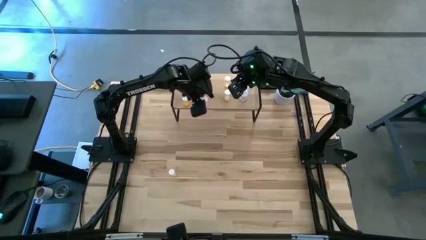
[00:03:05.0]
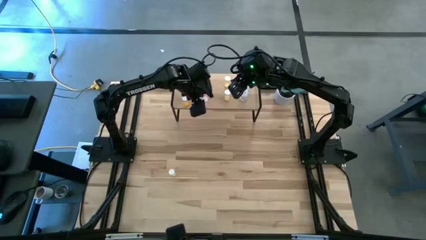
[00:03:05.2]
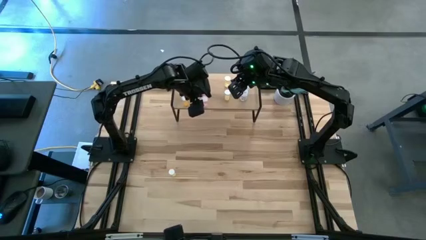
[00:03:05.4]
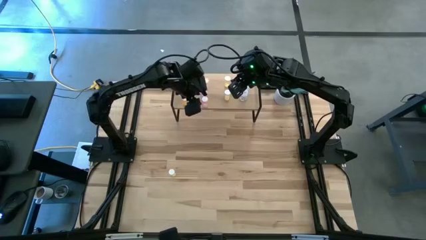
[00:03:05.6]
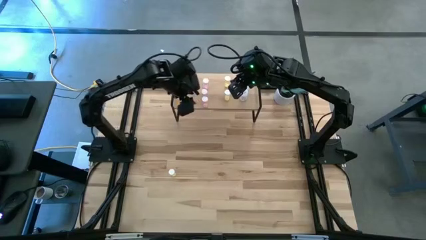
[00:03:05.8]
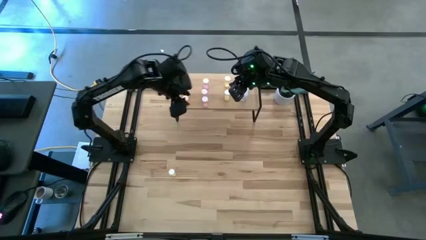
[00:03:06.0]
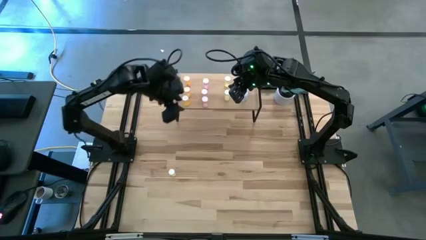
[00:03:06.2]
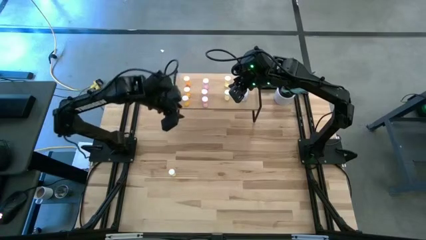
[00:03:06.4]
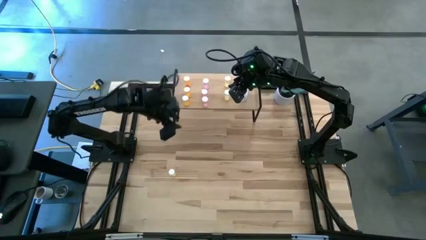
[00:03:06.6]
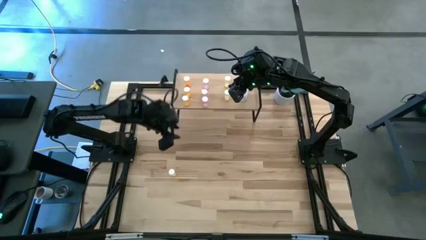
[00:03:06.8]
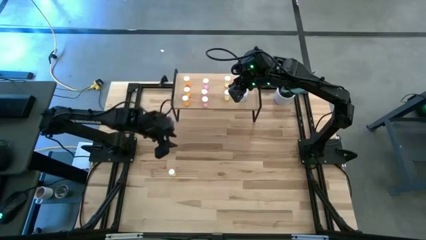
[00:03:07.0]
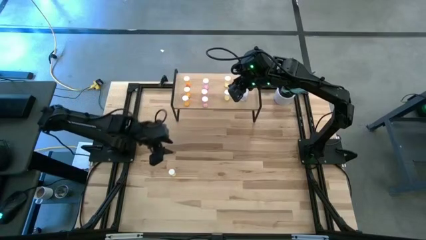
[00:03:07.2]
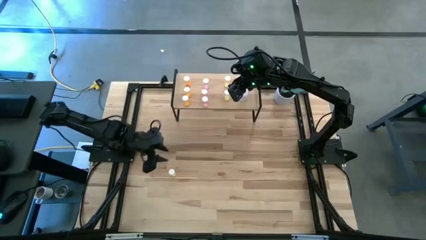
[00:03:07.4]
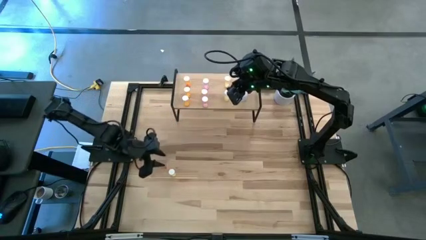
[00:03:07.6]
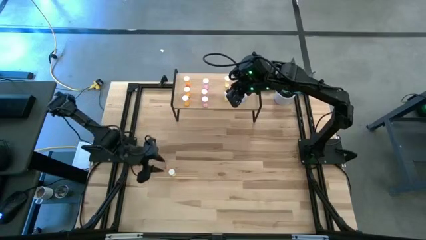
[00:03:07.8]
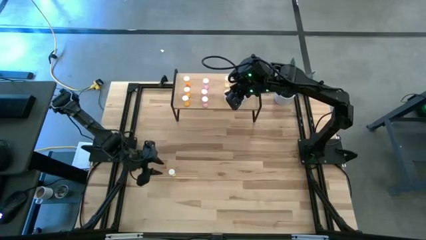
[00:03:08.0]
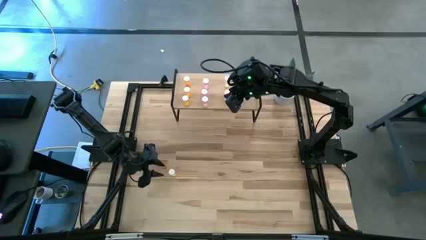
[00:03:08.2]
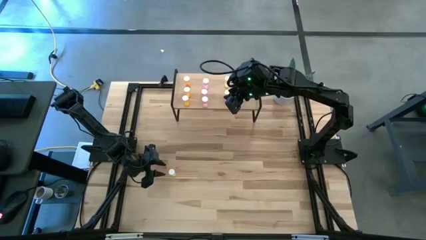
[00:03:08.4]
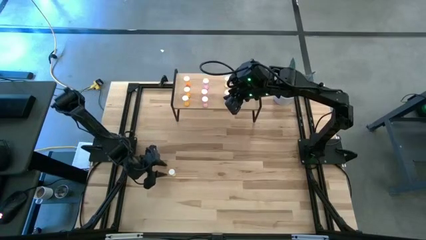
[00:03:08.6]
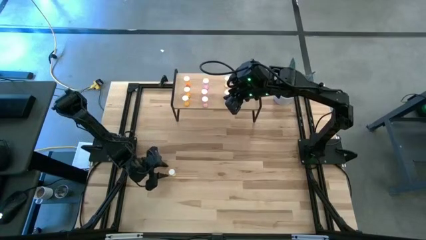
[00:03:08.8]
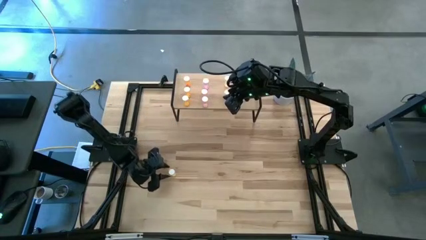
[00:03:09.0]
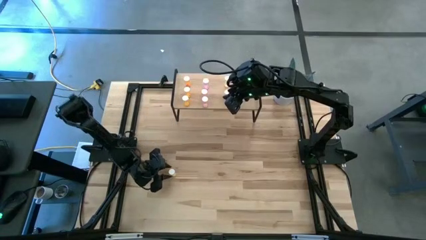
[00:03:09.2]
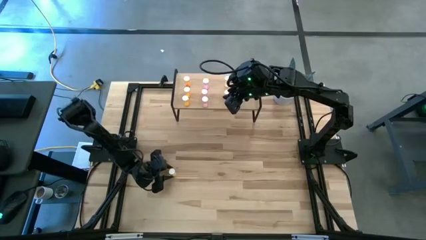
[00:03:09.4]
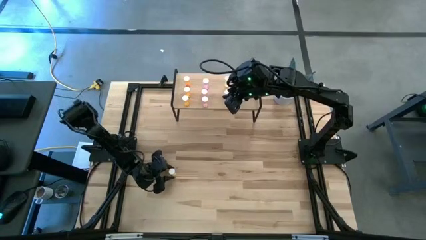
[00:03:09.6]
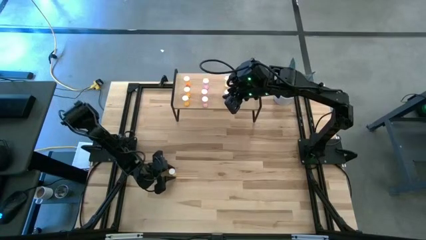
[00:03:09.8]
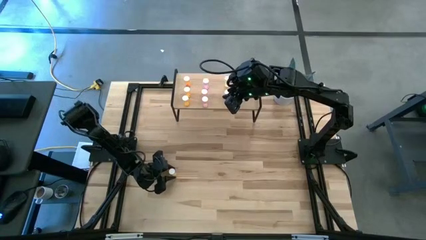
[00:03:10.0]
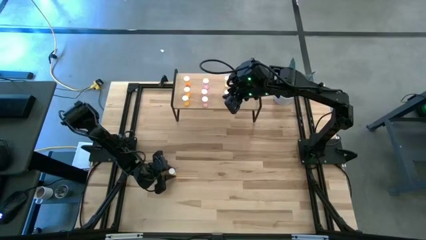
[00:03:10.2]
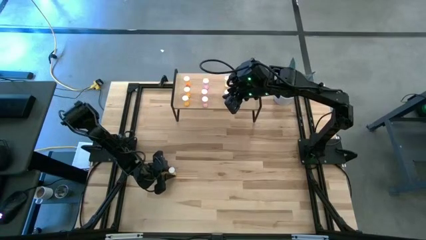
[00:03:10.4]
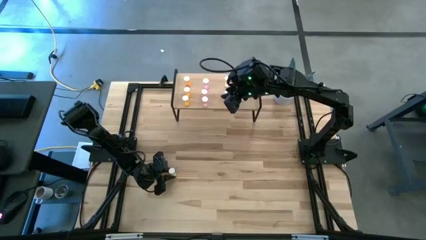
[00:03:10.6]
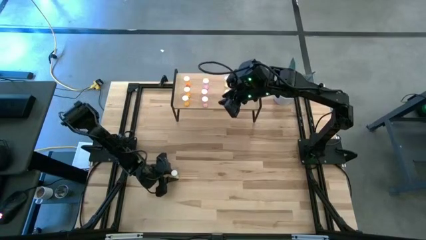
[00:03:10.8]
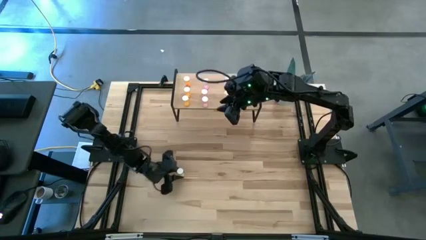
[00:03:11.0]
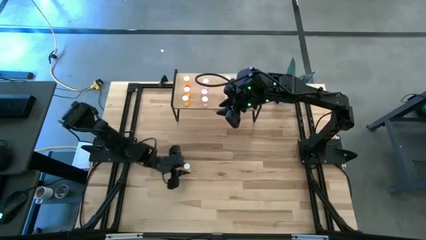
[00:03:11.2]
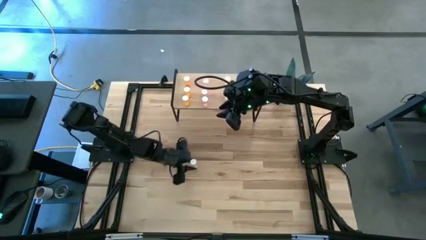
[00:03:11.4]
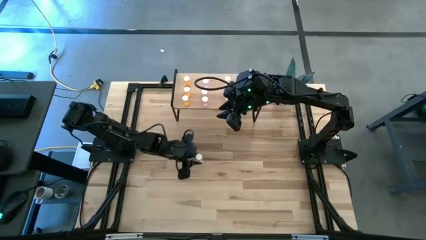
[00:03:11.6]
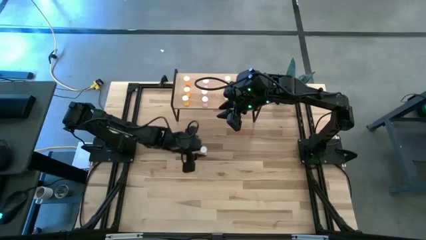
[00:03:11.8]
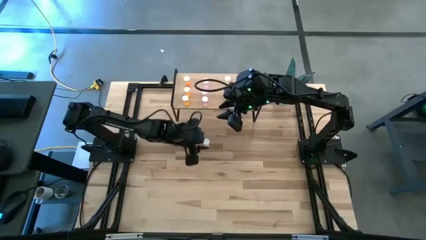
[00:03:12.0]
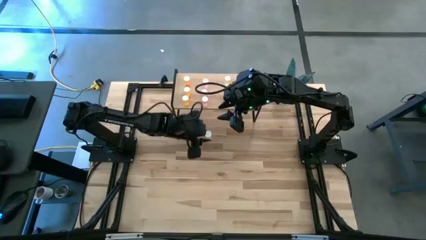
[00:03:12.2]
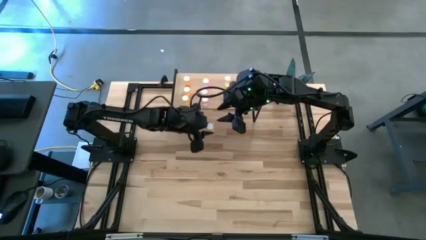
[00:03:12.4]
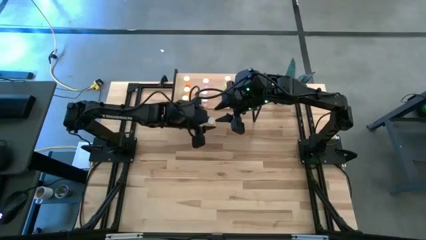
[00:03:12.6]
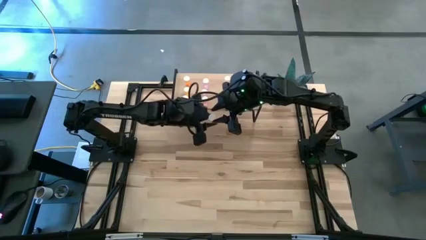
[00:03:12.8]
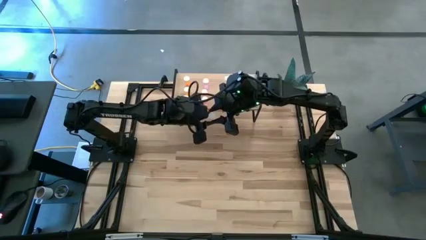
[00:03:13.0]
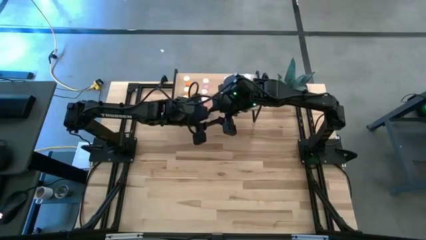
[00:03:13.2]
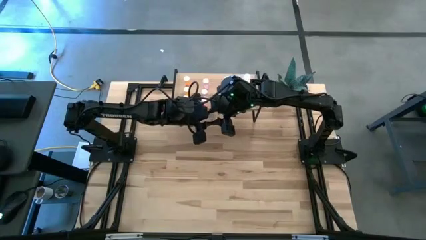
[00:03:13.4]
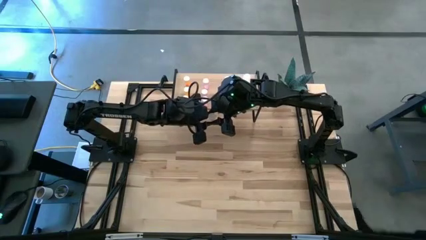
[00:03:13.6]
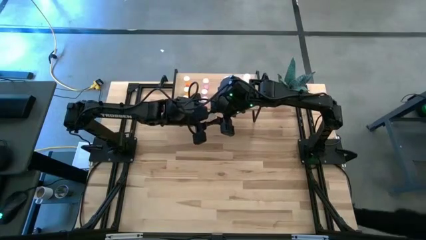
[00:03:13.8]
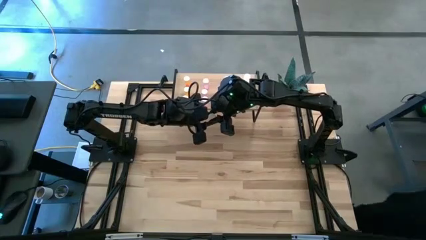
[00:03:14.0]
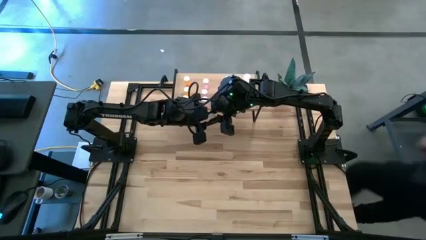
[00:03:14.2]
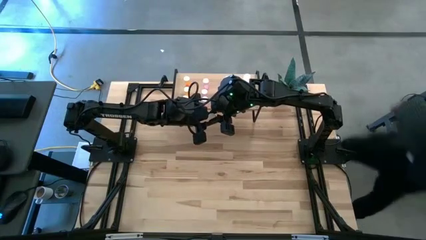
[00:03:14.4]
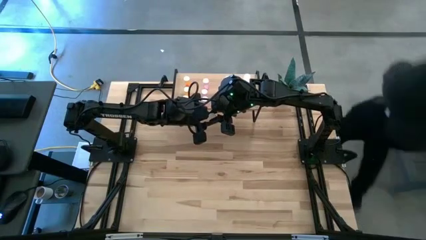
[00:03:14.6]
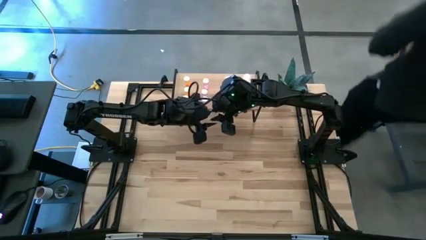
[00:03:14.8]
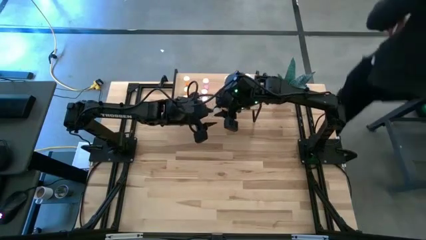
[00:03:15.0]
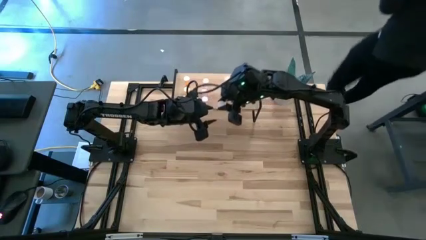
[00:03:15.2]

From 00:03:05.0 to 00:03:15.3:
Task: Pick and place medicine bottles onto shelf by color
Put the yellow pill bottle on the shelf aligned with the other yellow pill bottles
